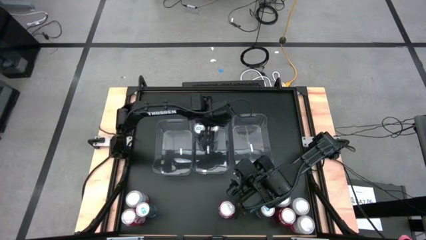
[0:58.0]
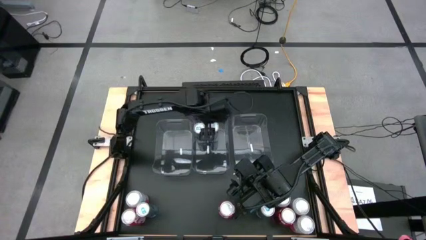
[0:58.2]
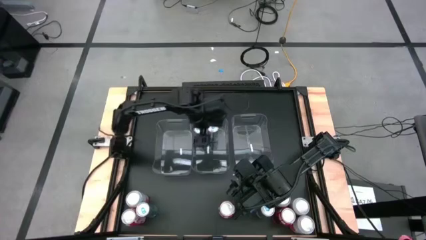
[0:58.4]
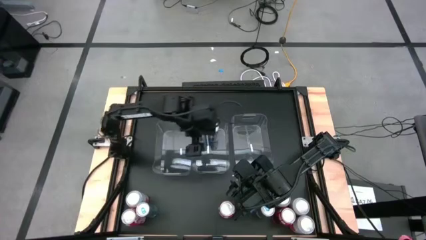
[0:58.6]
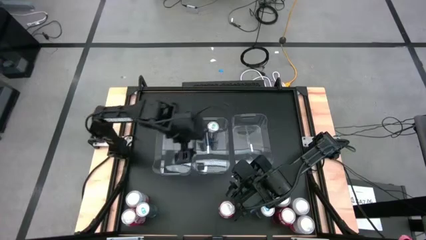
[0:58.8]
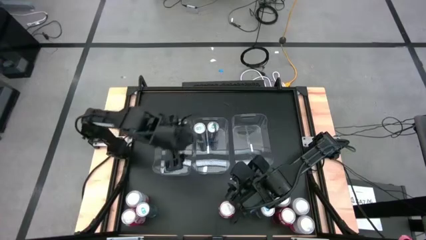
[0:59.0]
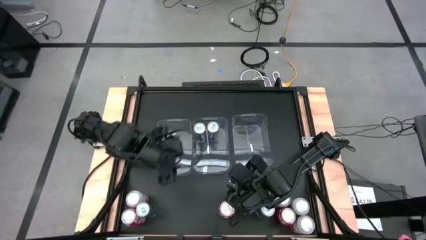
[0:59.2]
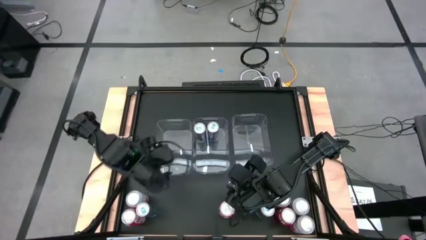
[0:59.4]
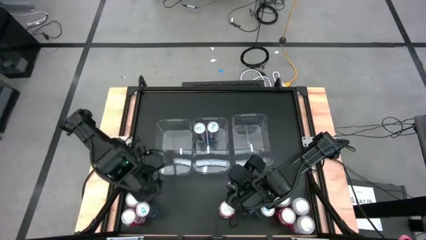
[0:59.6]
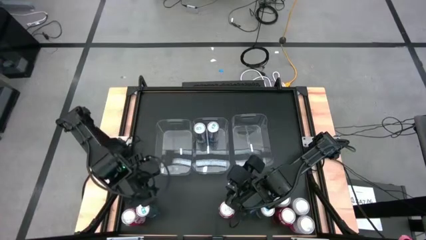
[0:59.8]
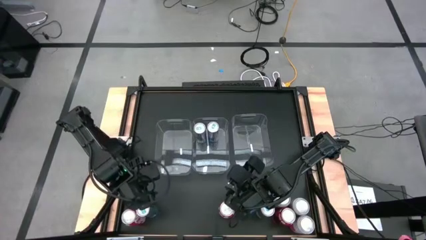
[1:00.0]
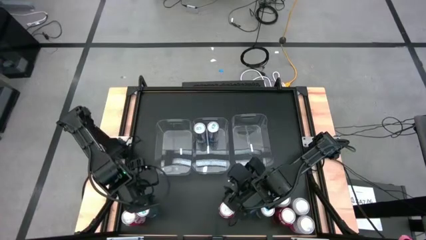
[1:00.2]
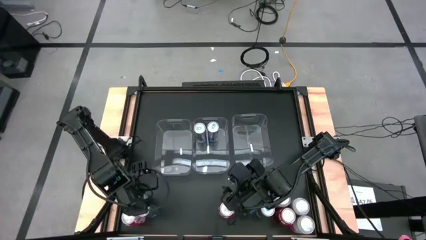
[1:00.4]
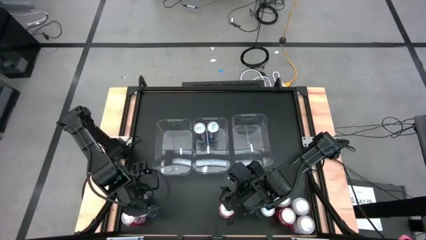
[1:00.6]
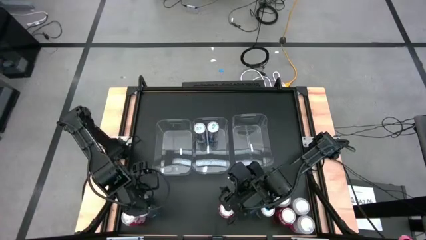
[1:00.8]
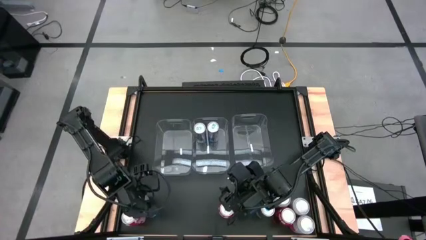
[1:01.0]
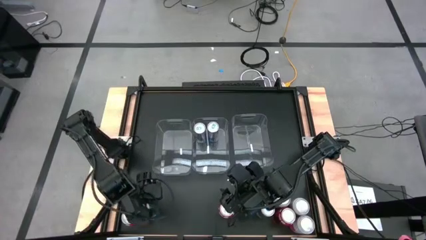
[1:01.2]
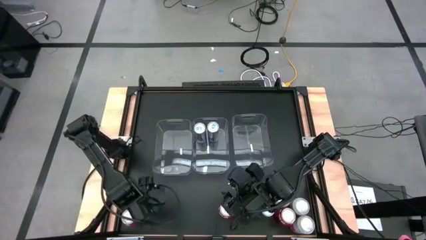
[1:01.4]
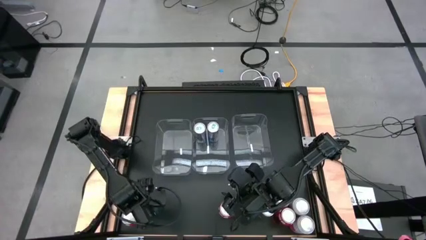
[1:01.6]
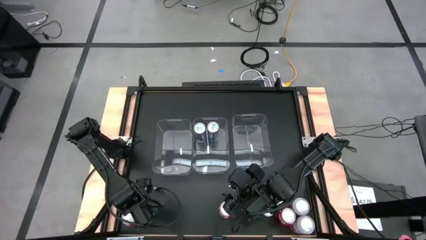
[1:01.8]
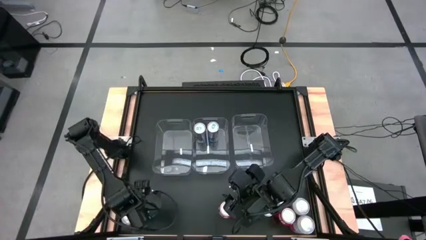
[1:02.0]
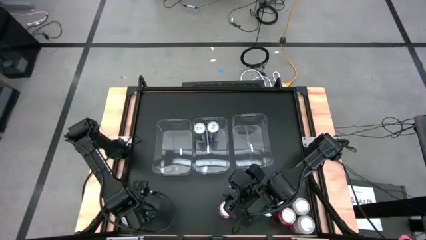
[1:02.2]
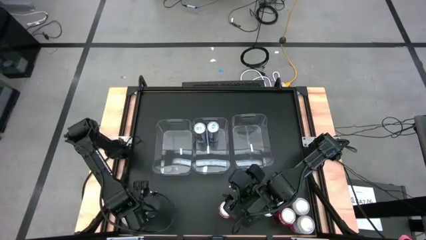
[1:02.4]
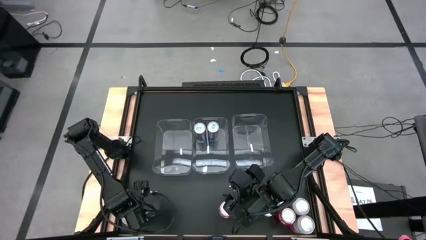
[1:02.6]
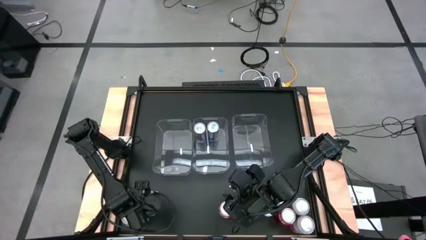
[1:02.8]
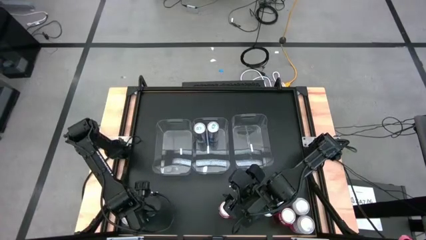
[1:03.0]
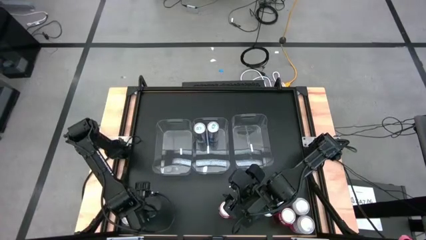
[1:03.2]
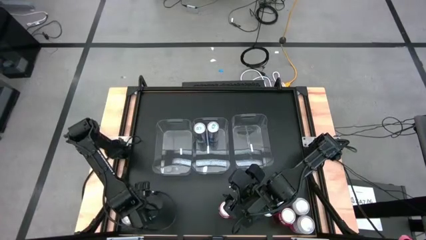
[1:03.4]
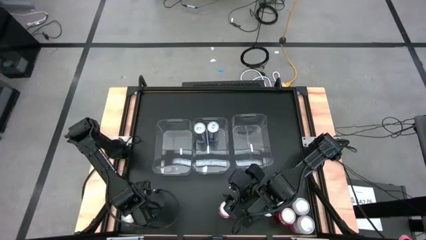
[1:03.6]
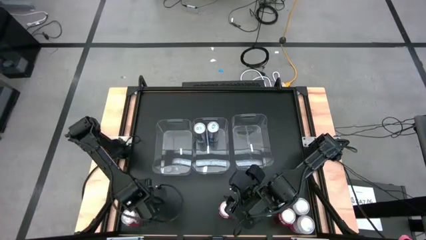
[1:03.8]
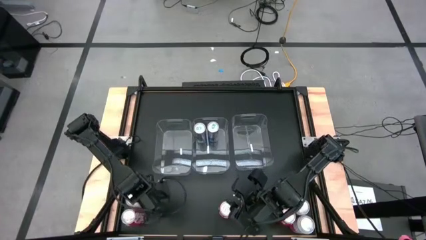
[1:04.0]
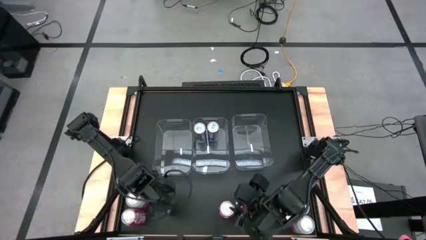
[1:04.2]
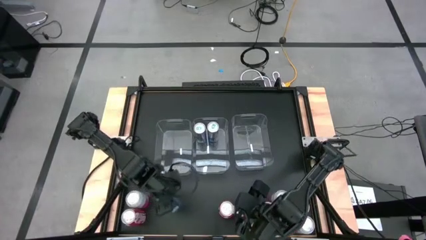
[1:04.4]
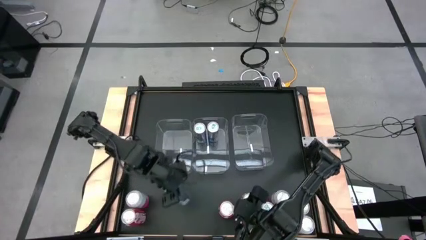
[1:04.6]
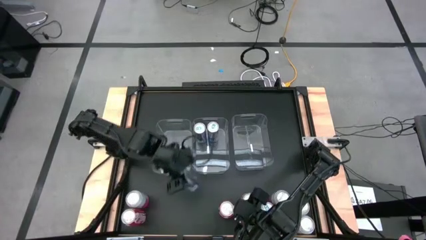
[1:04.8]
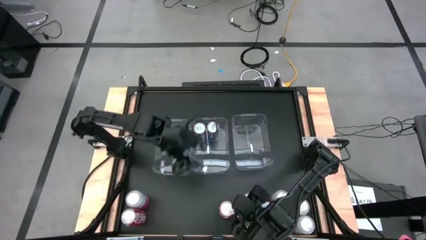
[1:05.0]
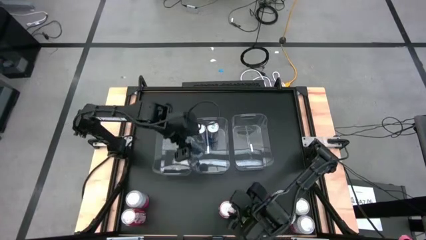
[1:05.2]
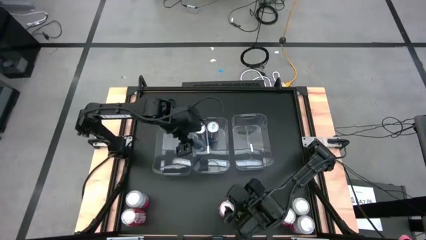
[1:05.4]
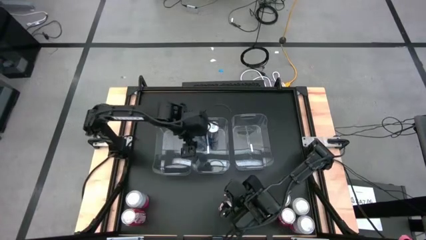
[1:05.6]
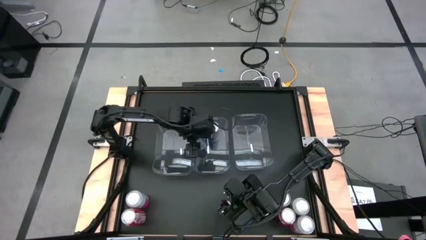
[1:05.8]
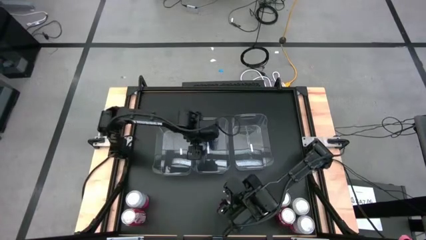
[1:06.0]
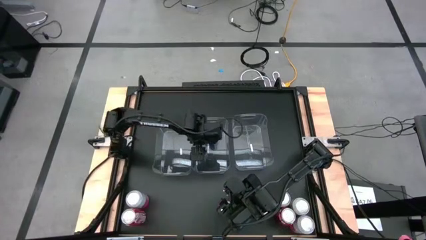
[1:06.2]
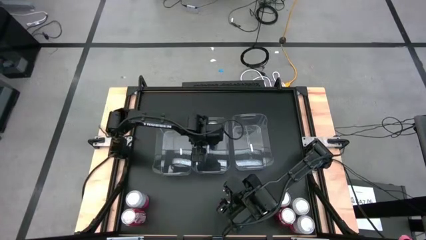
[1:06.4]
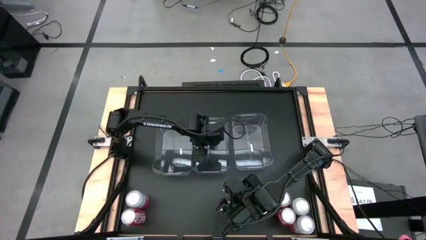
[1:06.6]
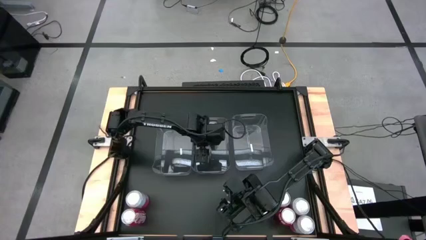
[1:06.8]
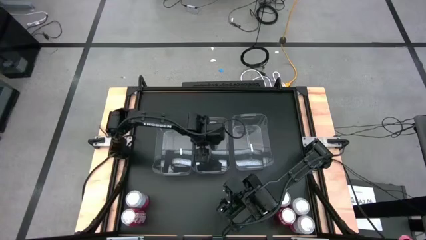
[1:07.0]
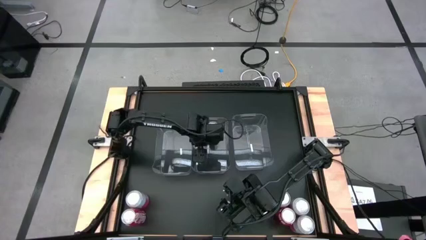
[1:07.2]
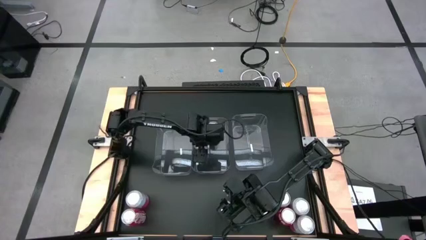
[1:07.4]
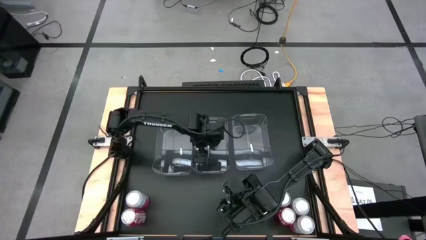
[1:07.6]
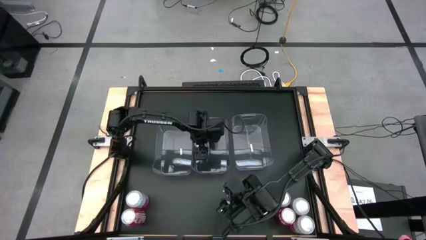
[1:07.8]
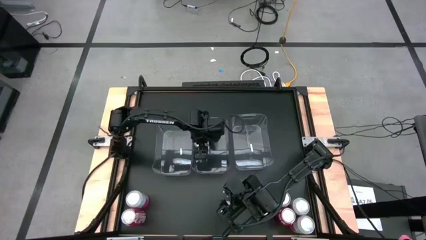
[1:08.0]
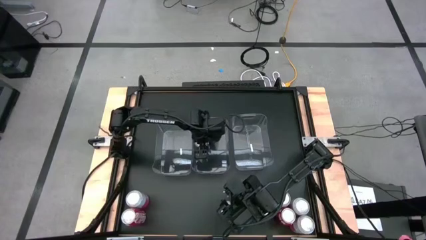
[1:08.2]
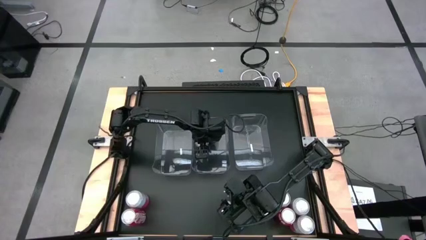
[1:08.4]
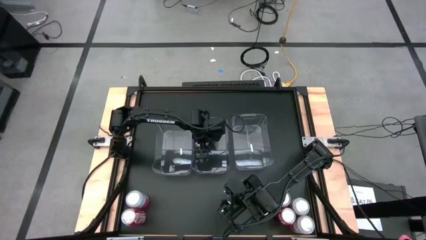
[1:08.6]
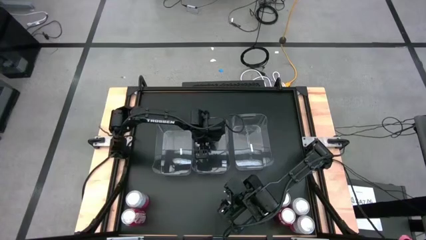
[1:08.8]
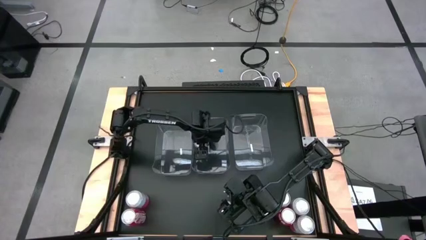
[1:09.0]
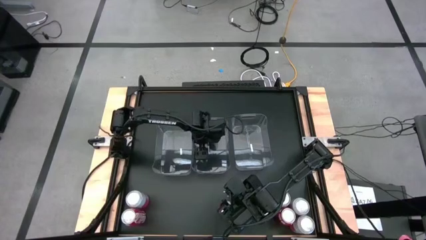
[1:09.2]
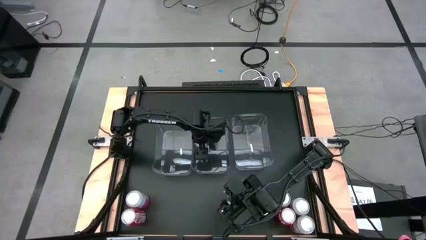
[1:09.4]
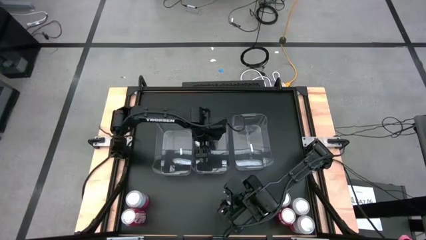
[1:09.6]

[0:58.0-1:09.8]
Task: Sort soda cans
Put the blue soda can into the middle transparent bin

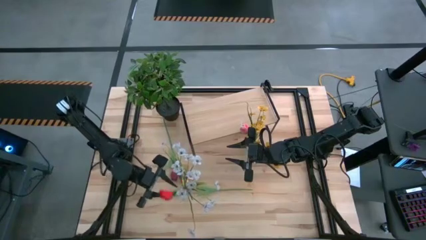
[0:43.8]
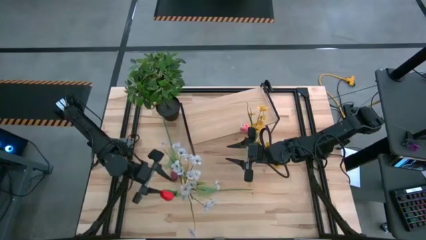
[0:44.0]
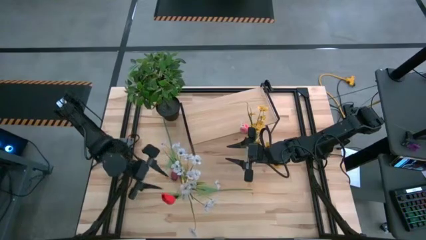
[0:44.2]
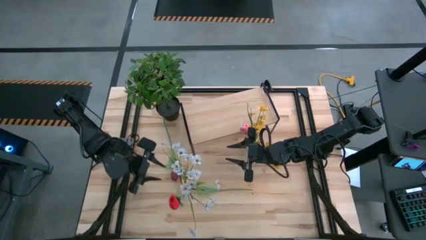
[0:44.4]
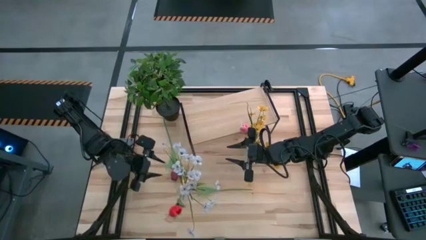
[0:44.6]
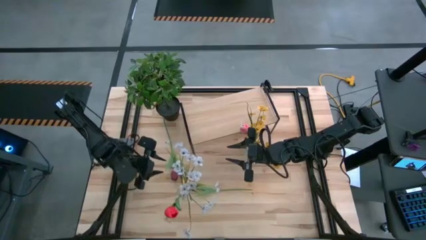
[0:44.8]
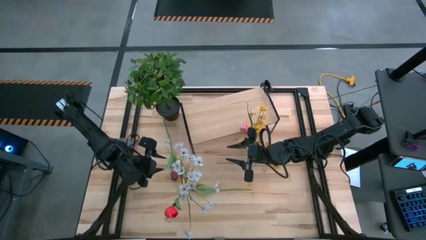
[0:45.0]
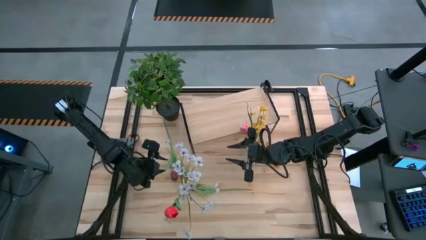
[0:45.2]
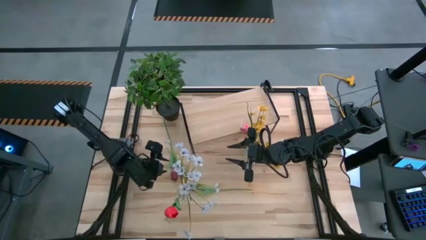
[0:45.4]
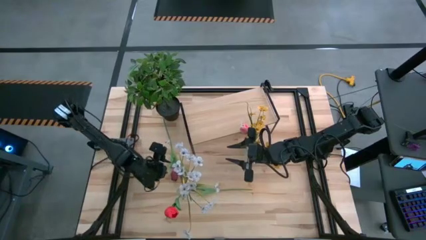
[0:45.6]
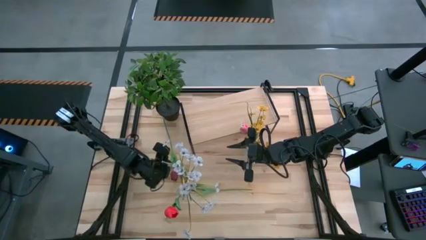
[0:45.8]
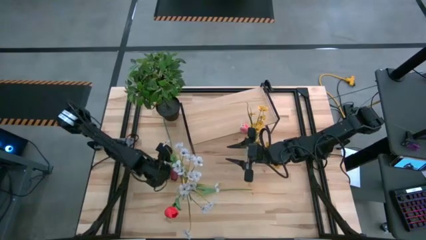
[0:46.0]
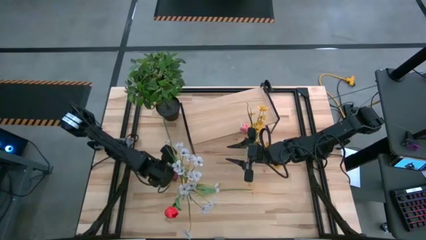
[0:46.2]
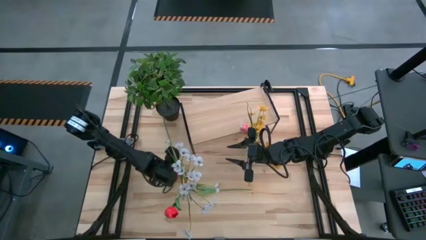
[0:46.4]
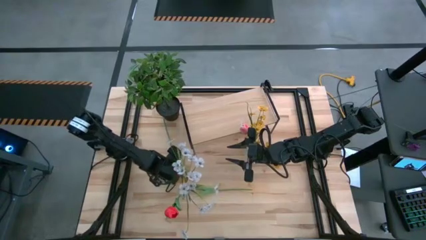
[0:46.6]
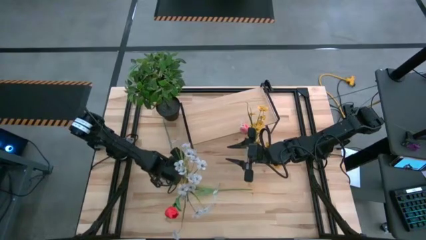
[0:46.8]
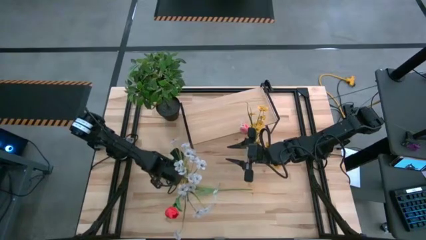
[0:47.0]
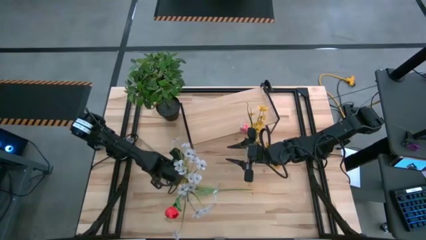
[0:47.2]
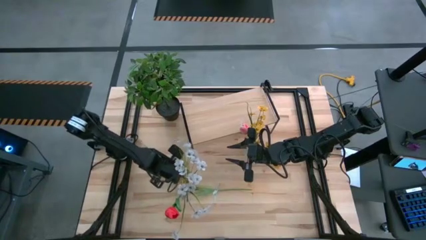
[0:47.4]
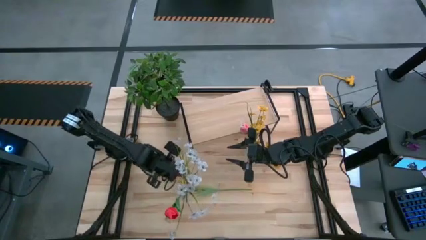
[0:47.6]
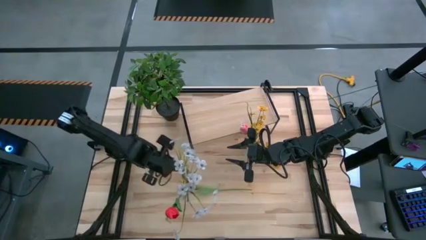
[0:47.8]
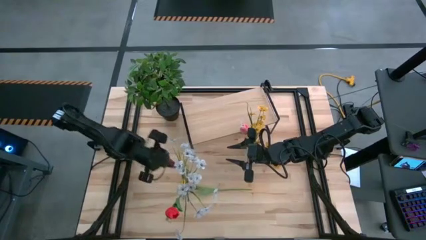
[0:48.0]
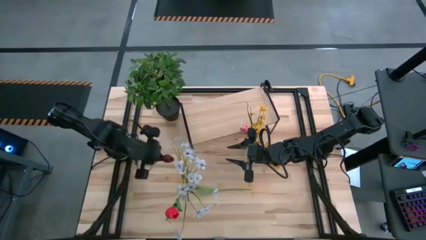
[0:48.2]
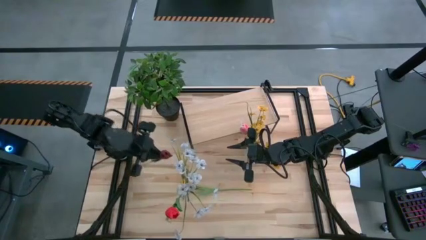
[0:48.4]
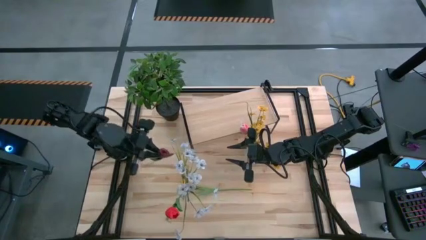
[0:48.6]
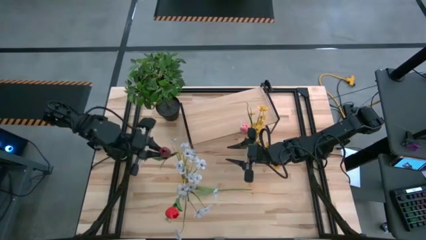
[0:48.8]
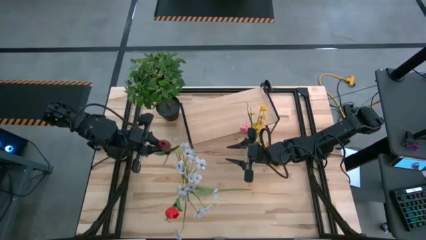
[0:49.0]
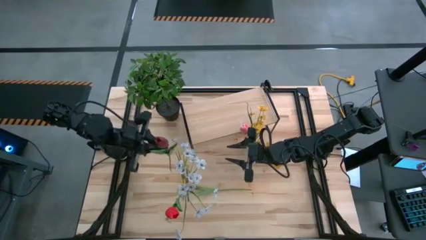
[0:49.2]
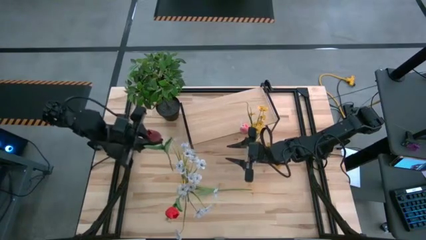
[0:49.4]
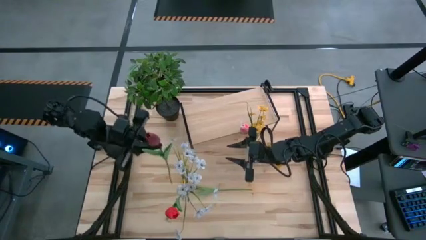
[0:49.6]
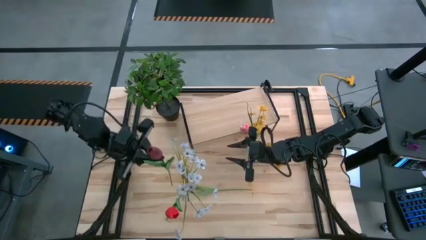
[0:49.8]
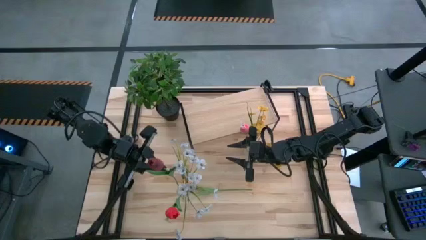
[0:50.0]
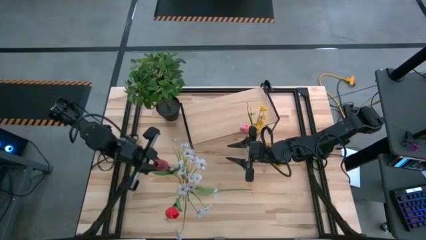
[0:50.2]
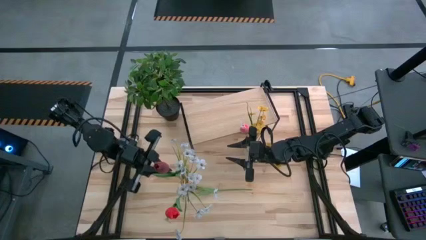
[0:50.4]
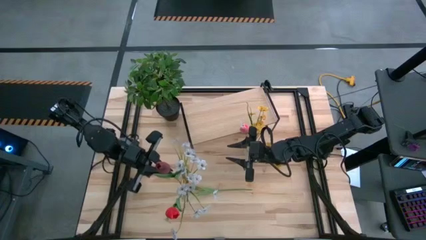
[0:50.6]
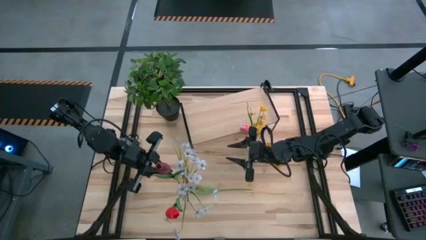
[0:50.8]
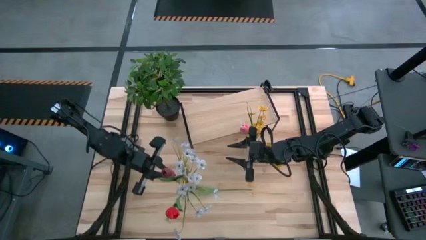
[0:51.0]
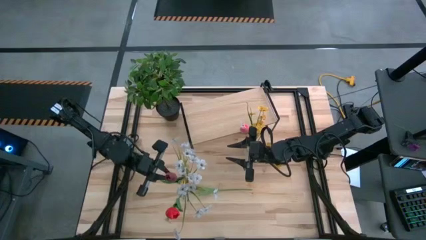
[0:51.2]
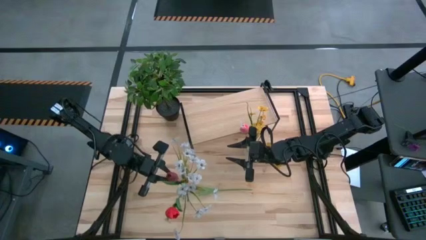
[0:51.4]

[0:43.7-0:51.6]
Task: Pick and place flowers into a vace then onto a shelf
Put the dark red flower into the bottom transparent vase
